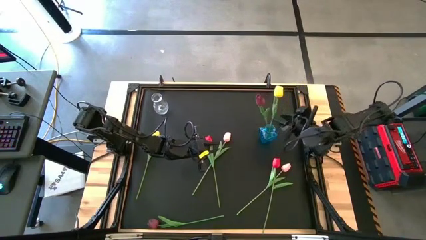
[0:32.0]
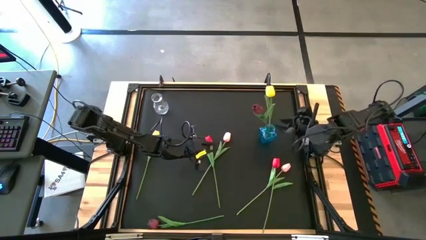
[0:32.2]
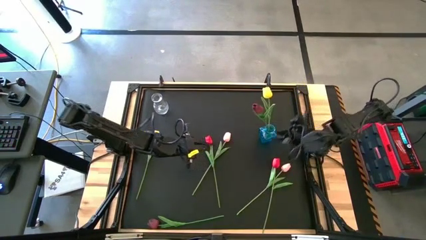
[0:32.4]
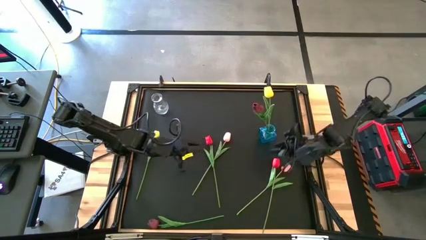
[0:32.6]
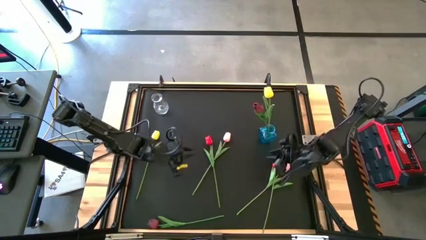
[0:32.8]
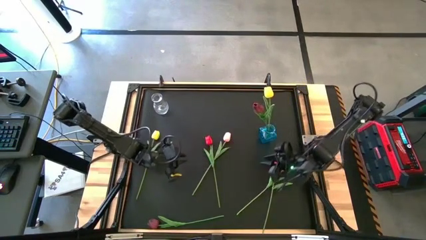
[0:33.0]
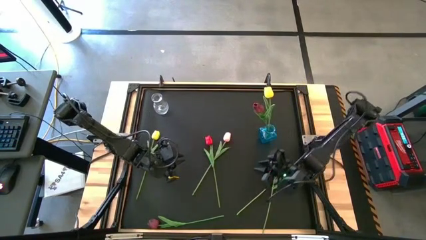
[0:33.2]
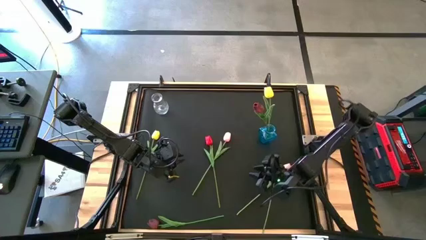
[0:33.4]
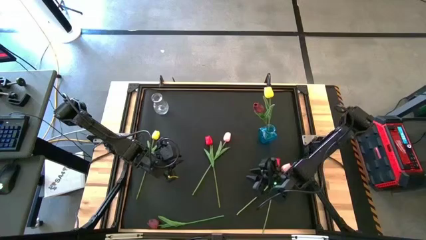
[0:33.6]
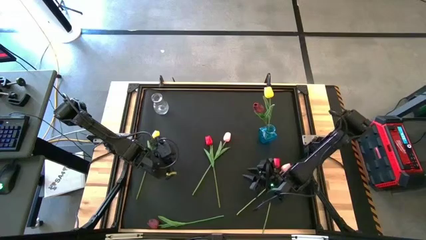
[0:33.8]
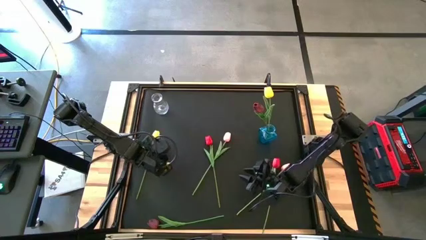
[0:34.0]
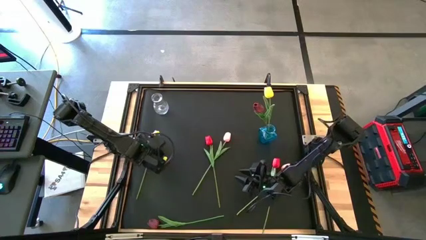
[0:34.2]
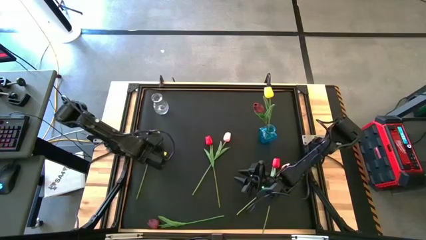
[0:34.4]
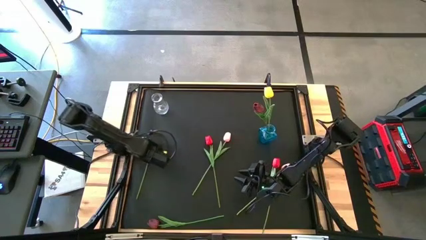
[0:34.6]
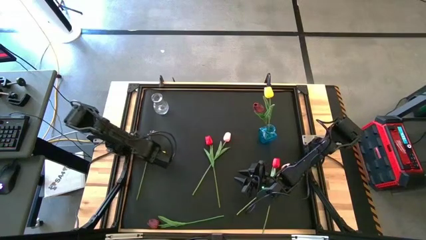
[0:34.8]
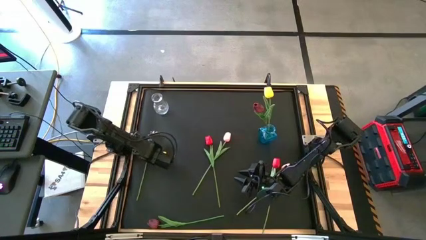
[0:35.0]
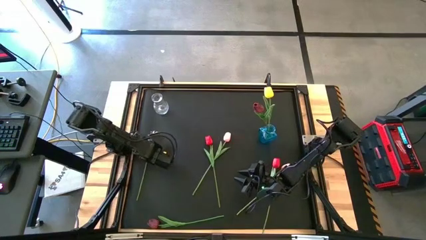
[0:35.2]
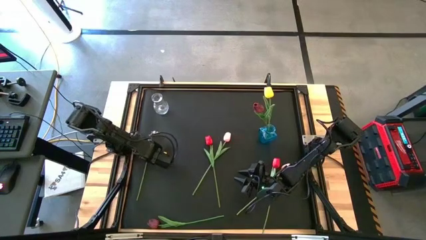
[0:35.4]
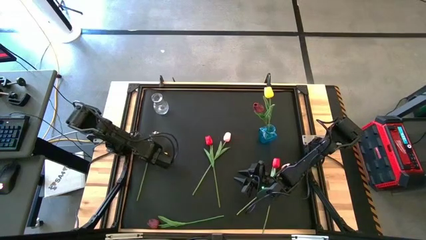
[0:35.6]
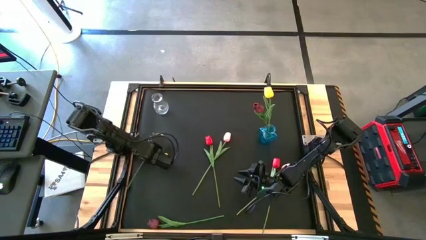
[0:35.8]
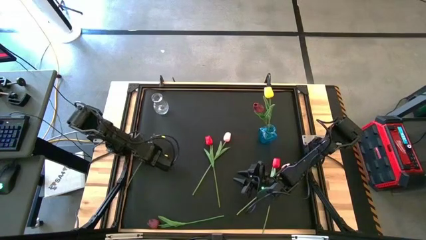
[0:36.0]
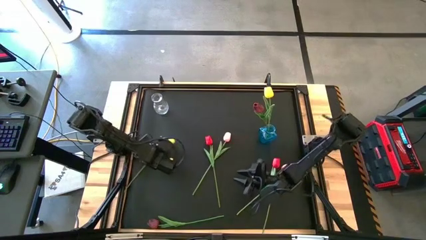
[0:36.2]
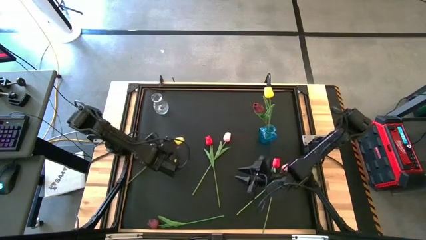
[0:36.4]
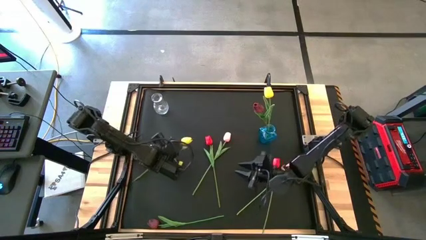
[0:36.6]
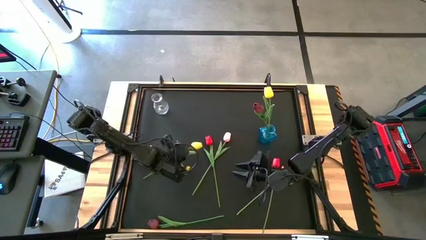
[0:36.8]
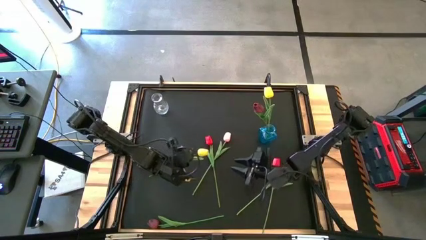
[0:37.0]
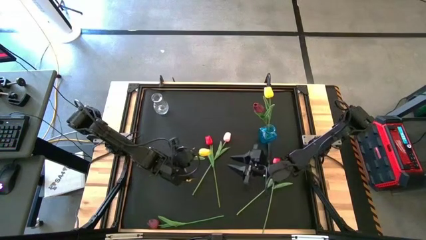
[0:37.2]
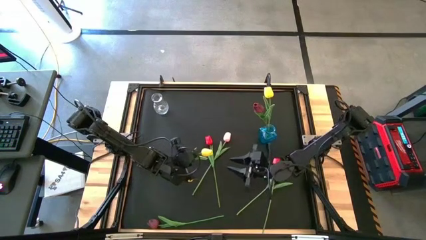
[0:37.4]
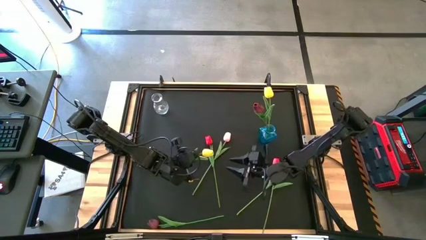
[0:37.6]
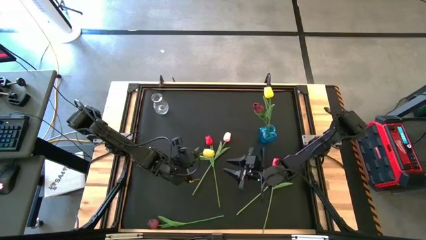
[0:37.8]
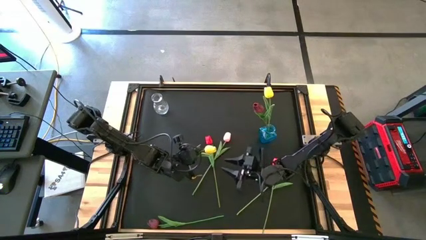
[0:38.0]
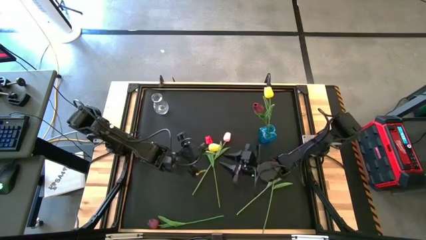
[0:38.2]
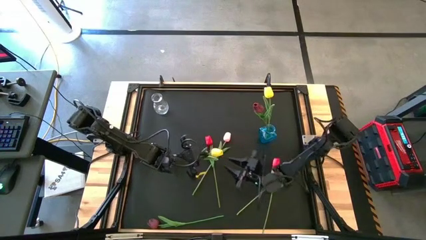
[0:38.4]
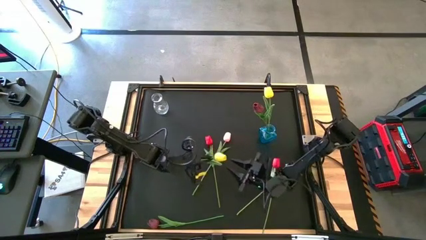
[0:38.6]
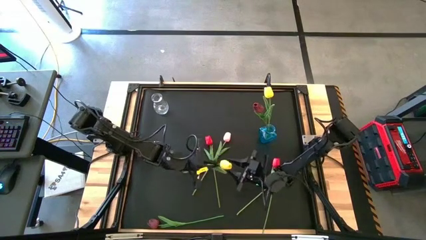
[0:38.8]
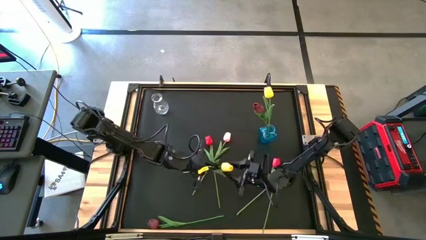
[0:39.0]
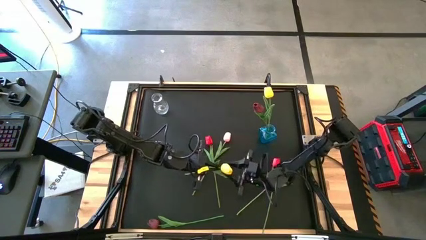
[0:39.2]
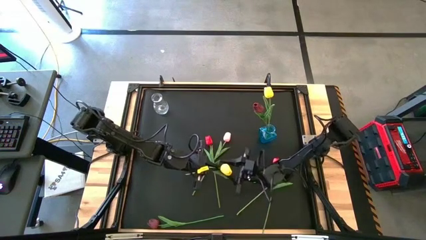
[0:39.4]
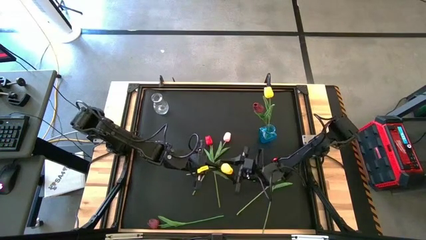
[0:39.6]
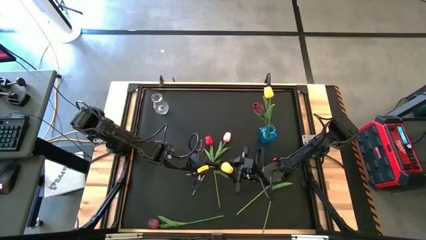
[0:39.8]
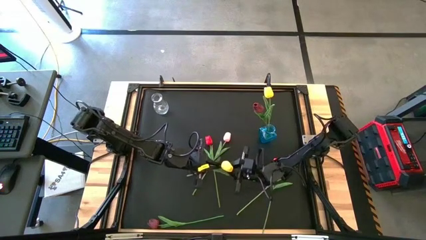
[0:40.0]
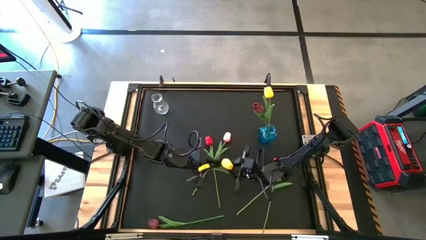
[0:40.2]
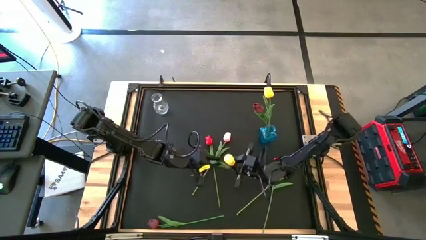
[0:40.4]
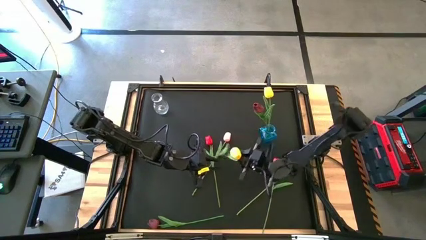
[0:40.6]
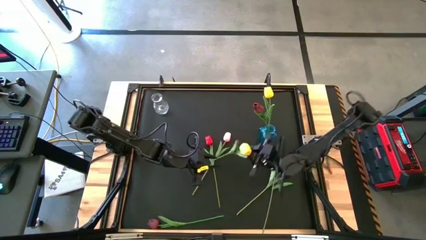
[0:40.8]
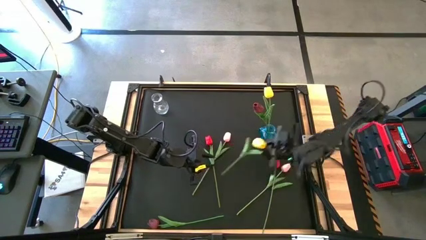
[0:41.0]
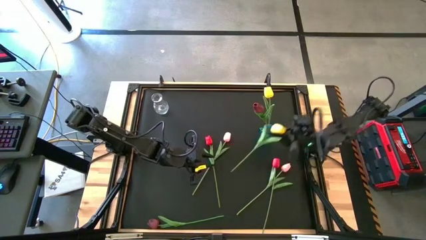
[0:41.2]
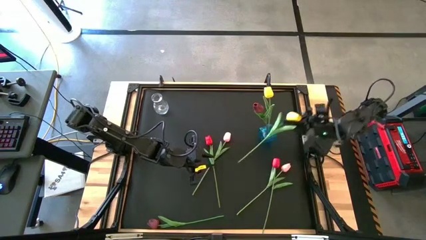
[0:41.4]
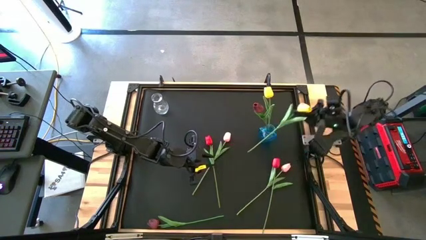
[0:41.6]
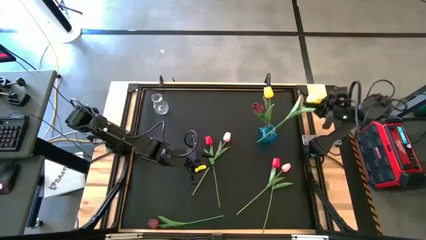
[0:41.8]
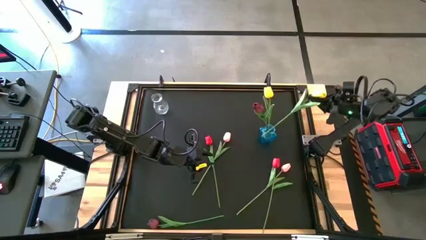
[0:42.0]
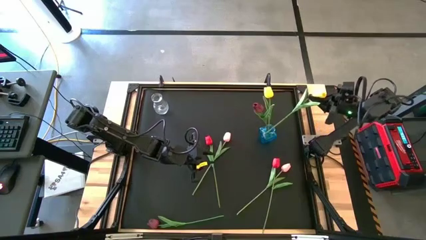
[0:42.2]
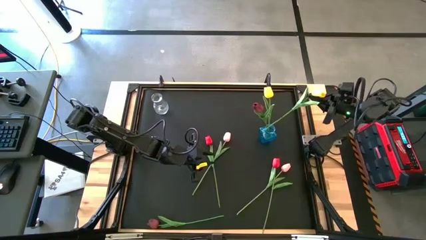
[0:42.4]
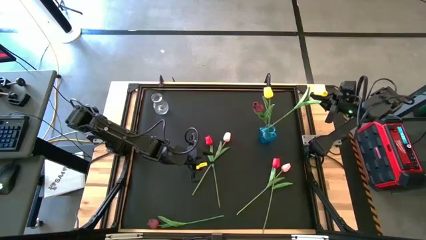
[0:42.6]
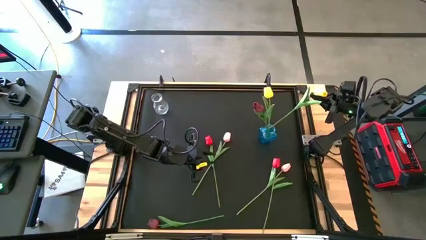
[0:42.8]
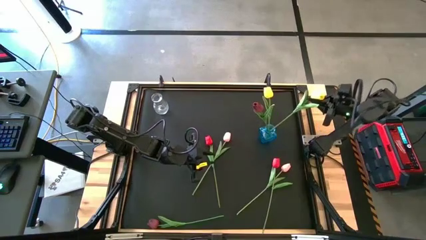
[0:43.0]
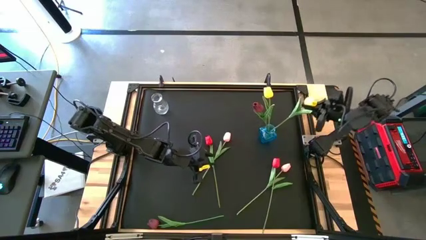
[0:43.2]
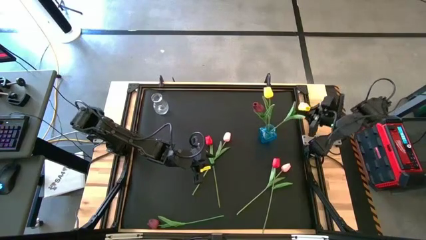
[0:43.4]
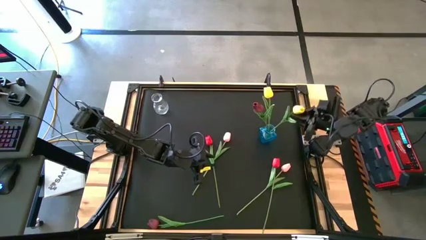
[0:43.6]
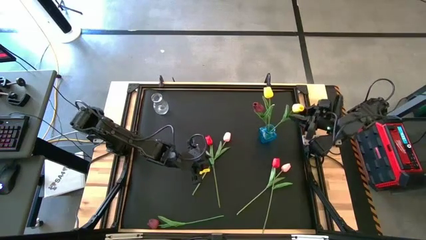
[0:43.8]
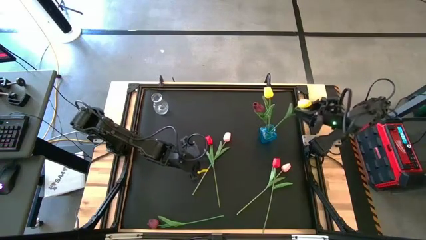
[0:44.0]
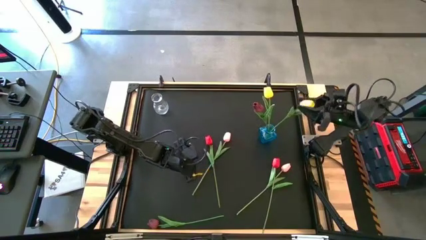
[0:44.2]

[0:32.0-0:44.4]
Task: Sort flowers into vase by color
Put the yellow flower into the blue vase
